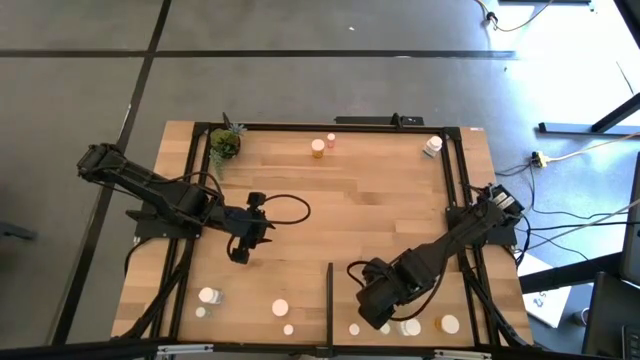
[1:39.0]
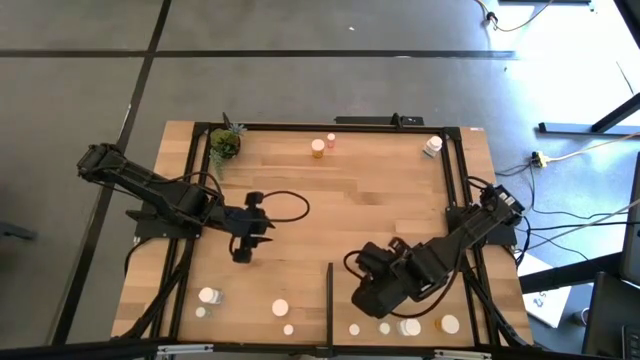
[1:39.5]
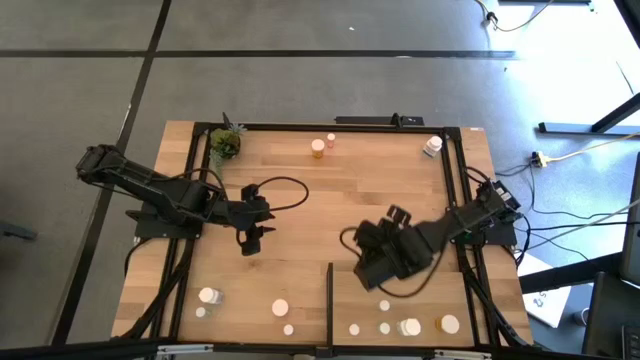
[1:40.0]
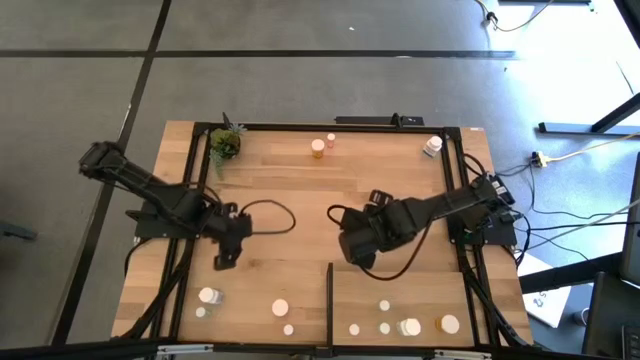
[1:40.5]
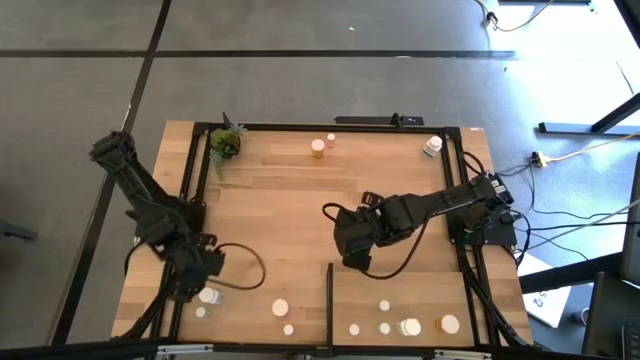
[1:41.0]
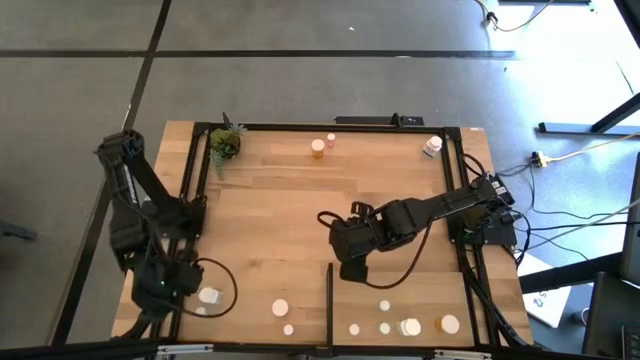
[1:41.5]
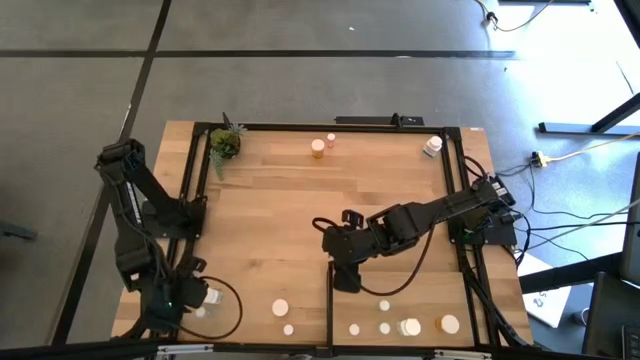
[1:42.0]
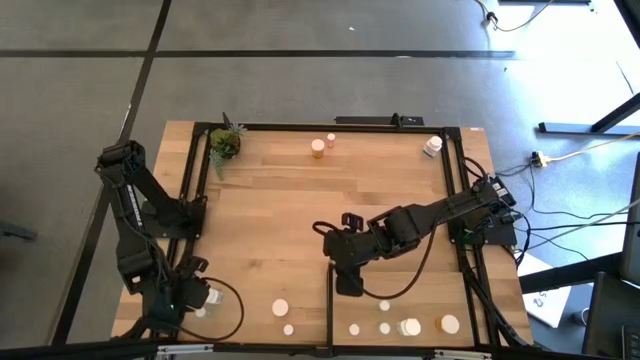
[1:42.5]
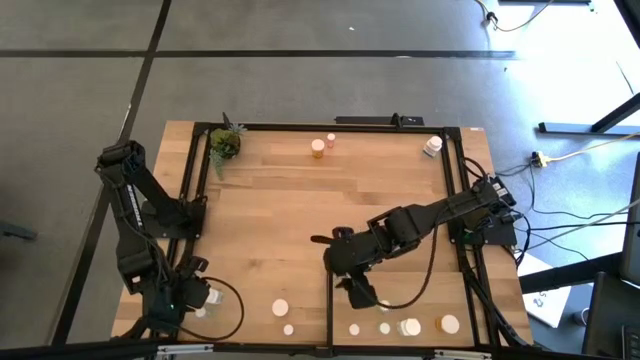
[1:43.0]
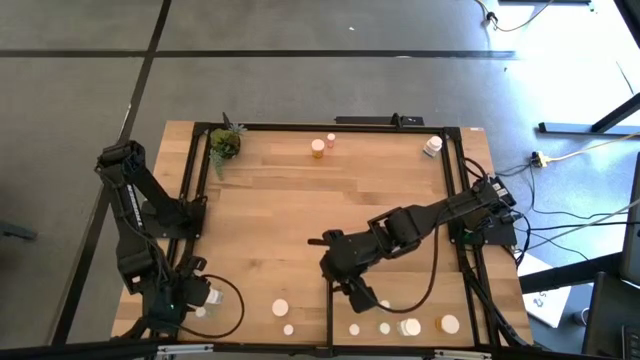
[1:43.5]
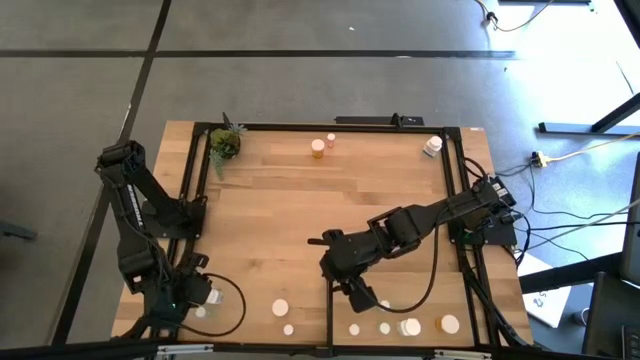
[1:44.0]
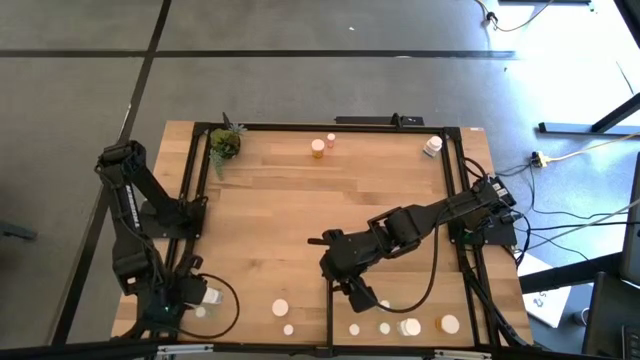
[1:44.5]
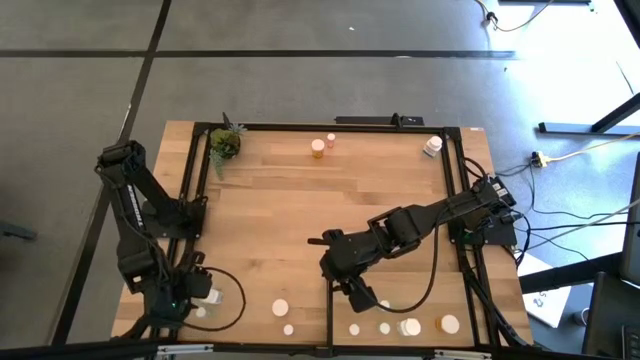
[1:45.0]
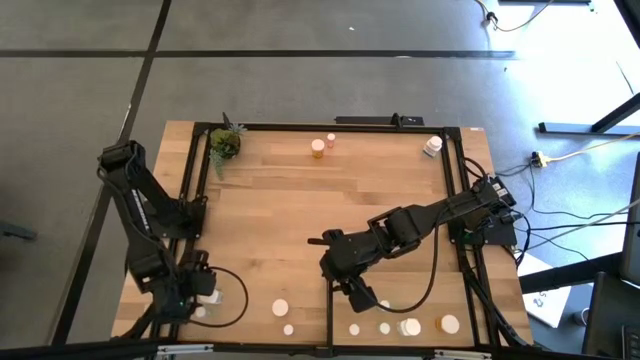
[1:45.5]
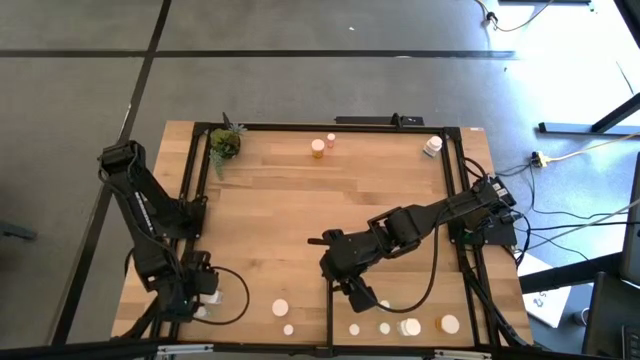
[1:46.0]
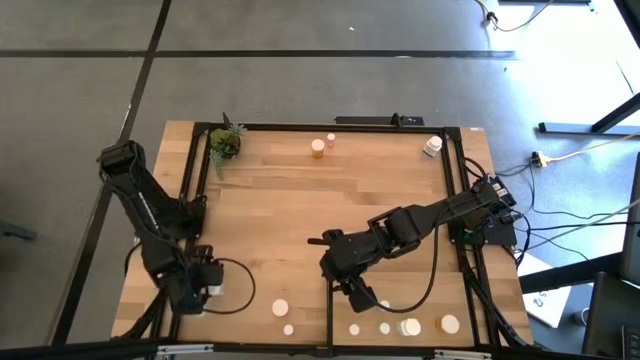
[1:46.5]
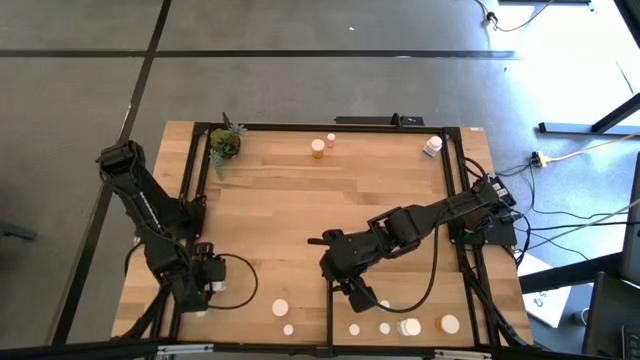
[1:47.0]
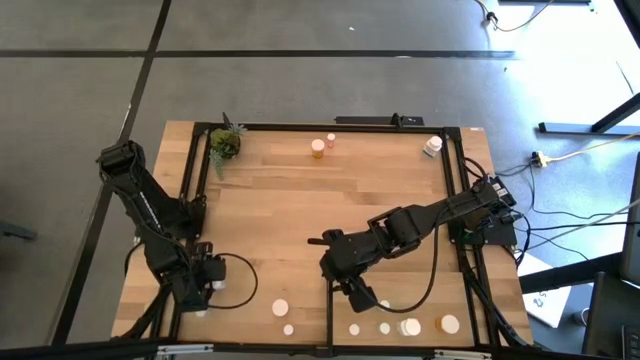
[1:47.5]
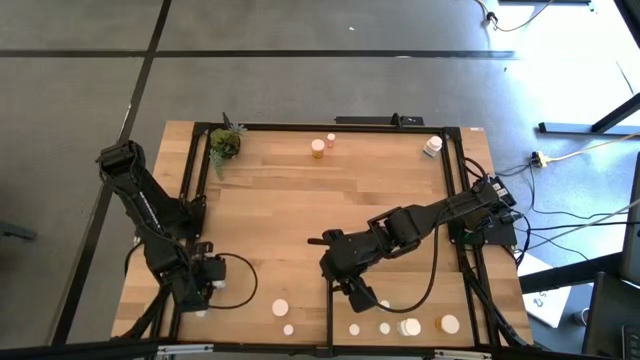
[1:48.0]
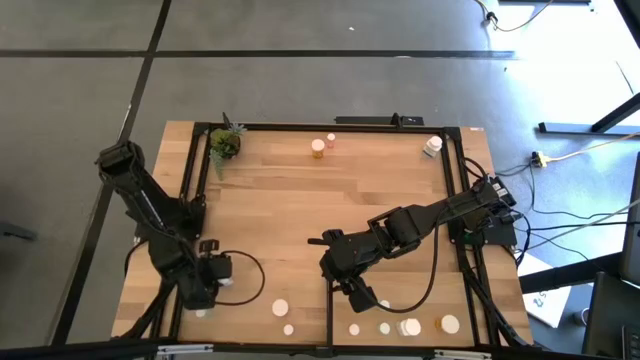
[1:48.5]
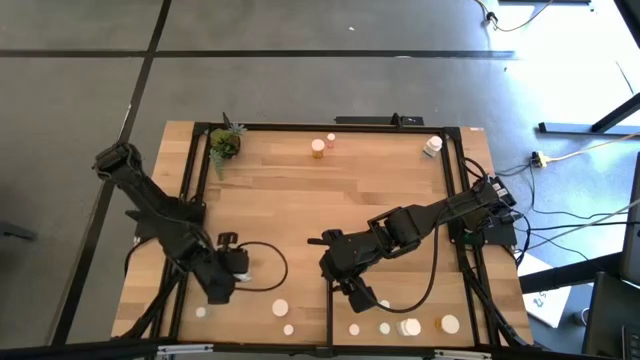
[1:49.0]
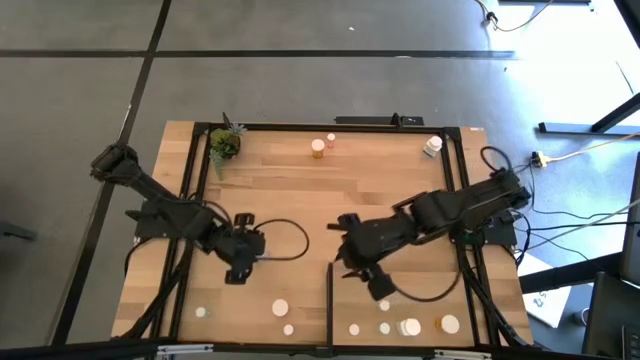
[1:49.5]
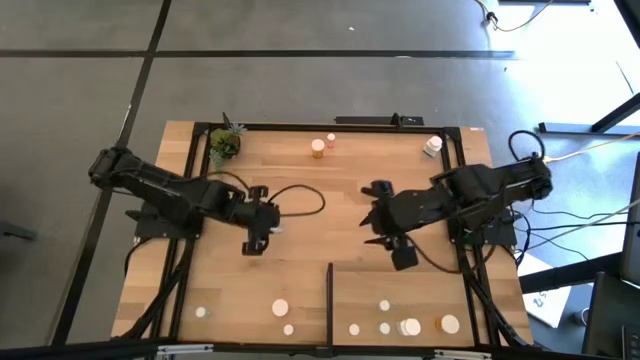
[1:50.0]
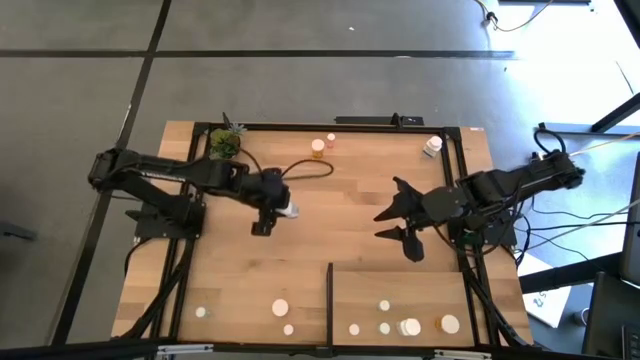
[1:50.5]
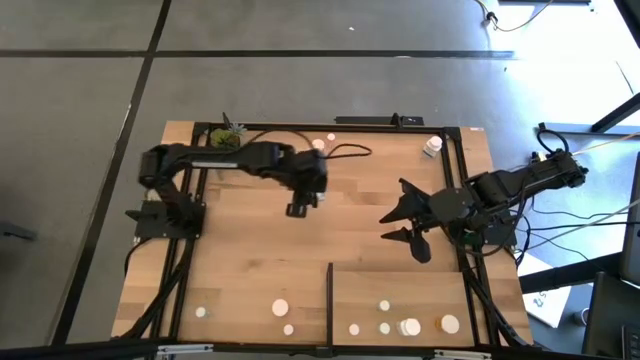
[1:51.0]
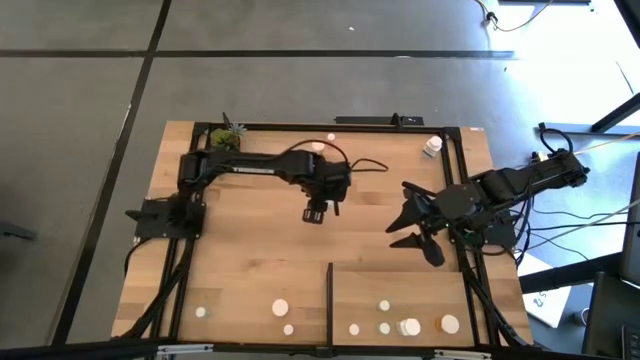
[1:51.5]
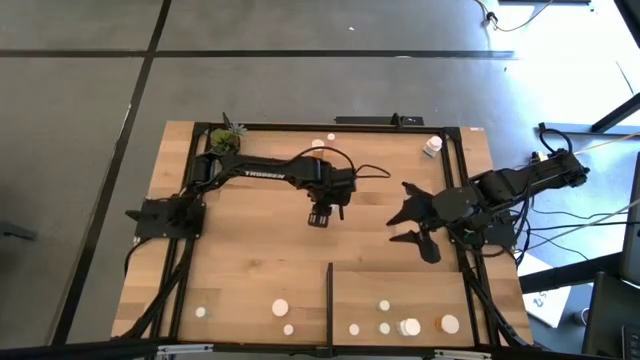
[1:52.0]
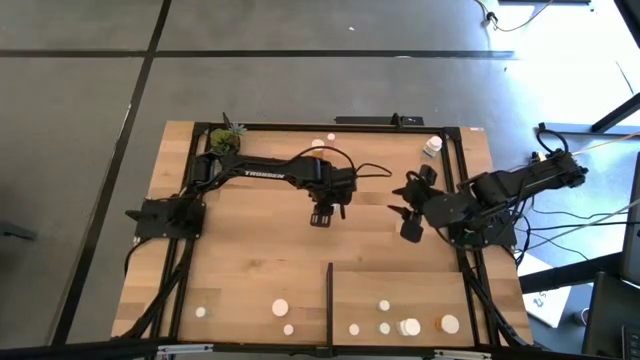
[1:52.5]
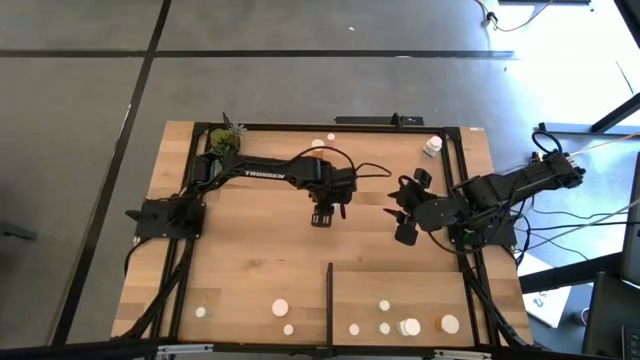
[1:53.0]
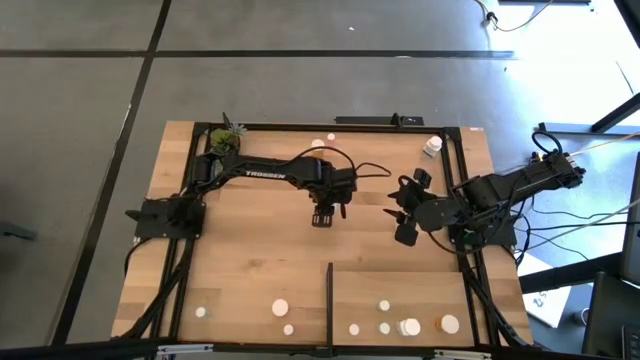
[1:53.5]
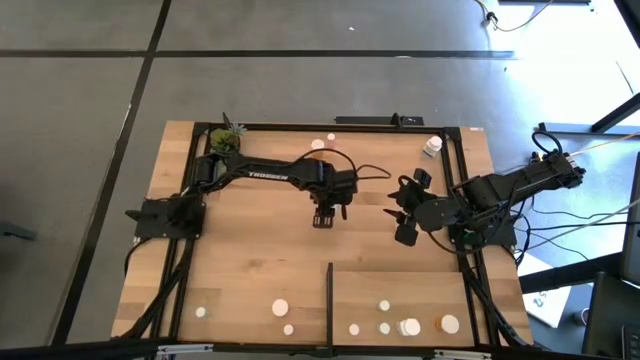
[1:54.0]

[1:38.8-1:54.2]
Task: Pick and place medicine bottles onto shelf by color
Put the bottom white pill bottle on the shelf aligned with the other white pill bottle

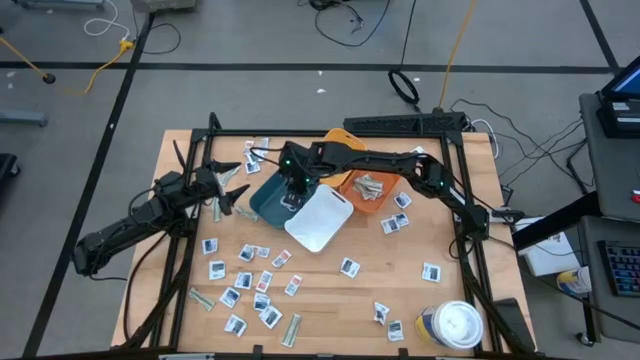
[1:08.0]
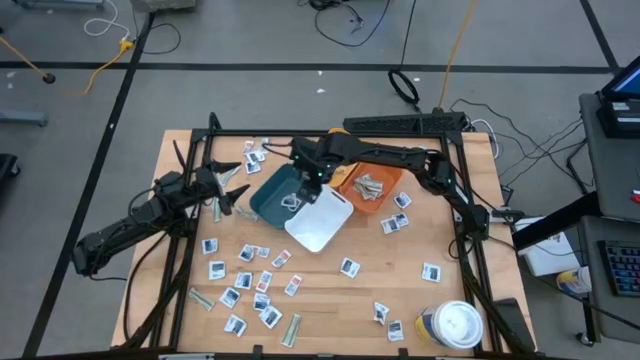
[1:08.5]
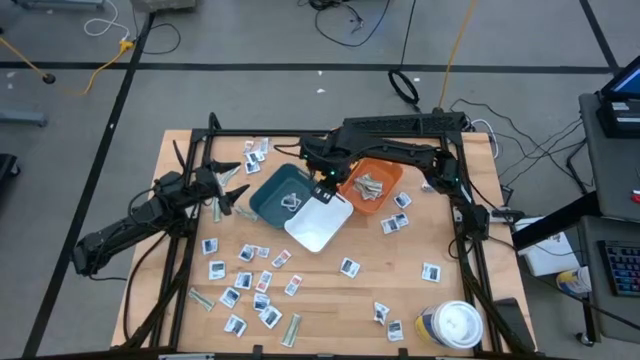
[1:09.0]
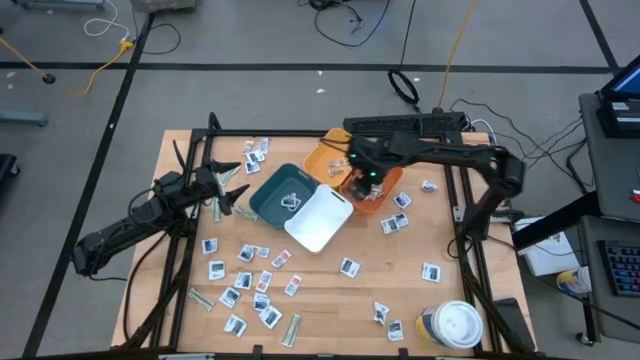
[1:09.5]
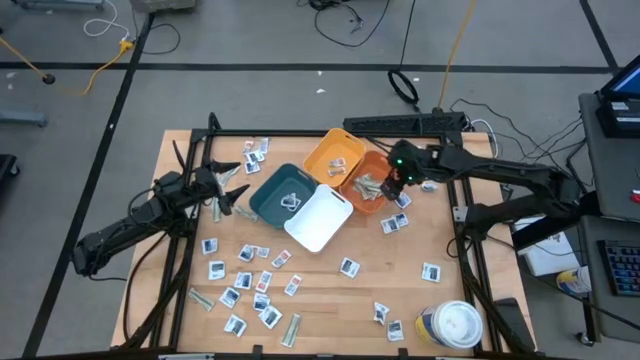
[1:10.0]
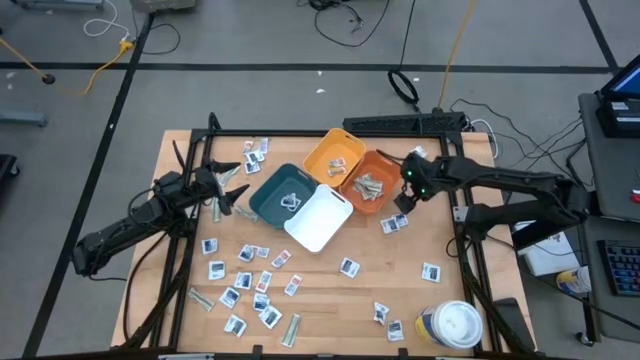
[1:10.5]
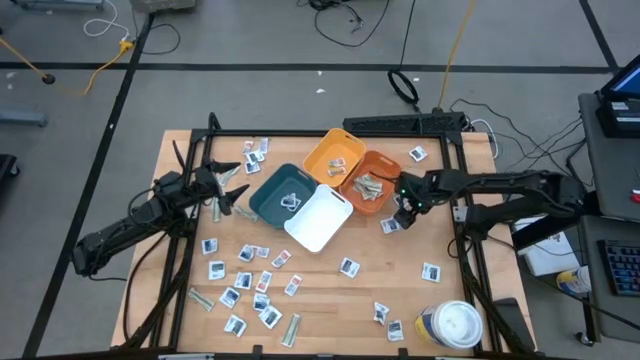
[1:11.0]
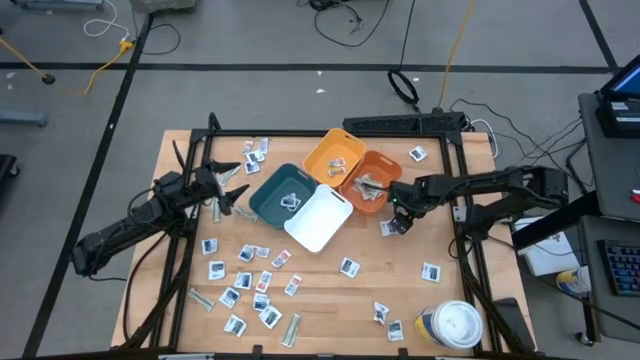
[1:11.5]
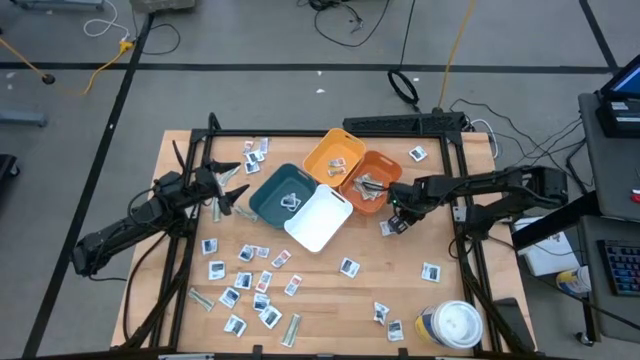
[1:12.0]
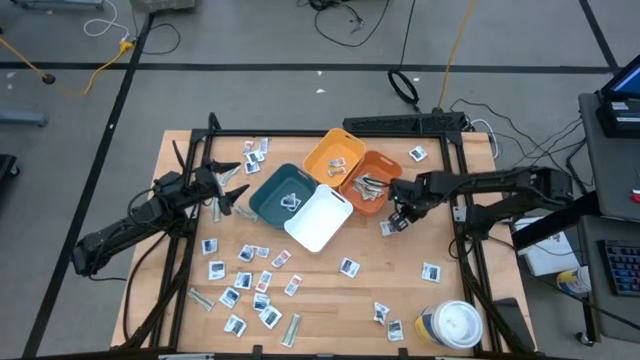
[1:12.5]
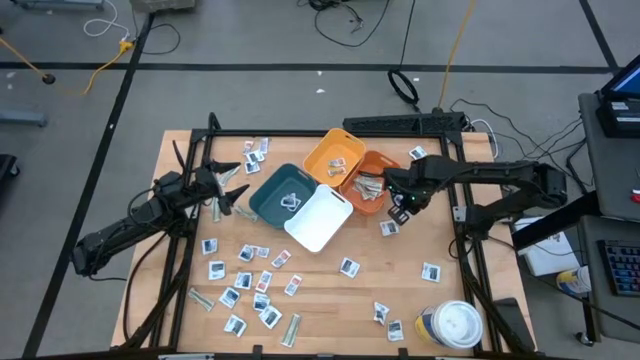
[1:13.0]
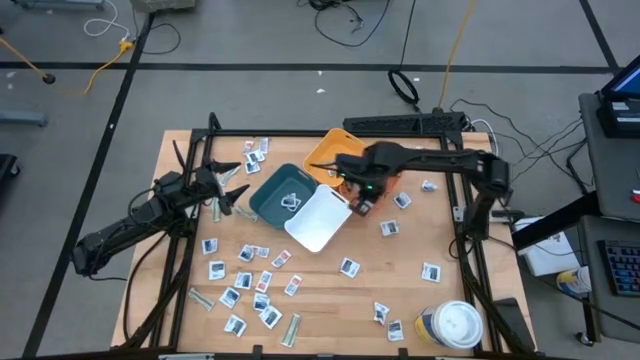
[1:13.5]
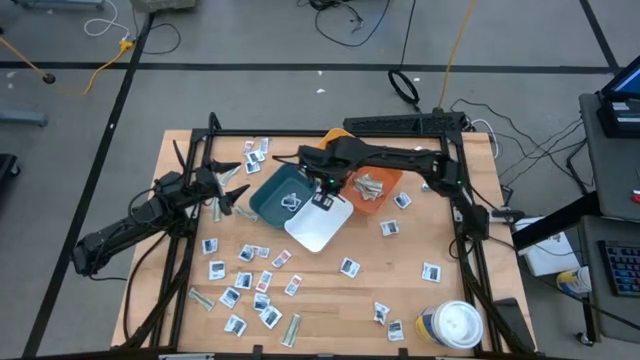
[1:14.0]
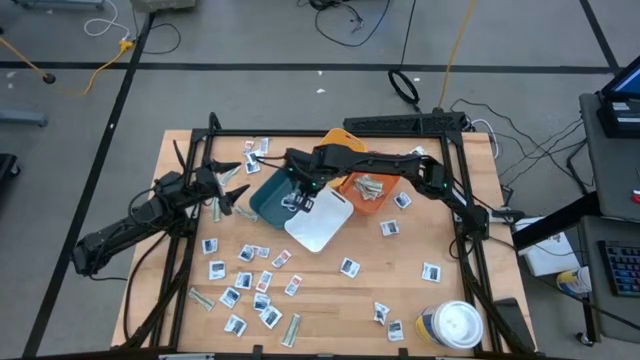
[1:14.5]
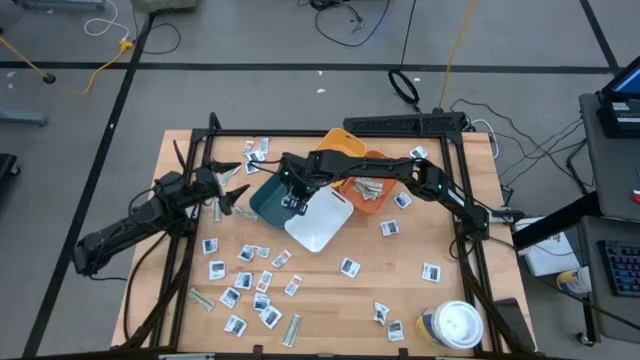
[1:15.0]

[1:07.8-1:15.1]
Task: Pick & Place First Aid Supplies
Put the blue alcohol pad into the blue bin
